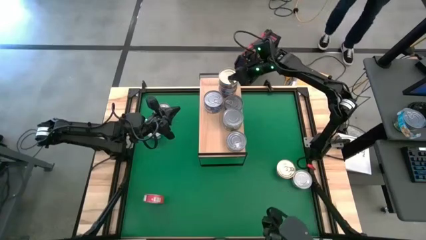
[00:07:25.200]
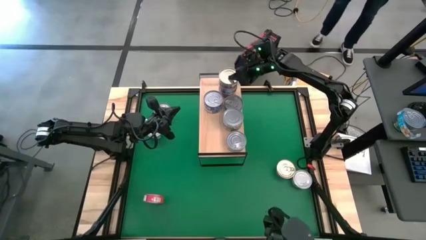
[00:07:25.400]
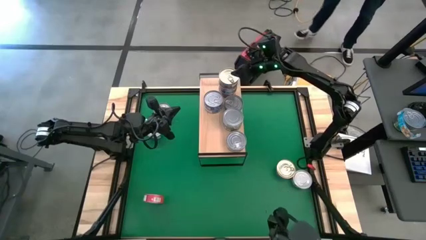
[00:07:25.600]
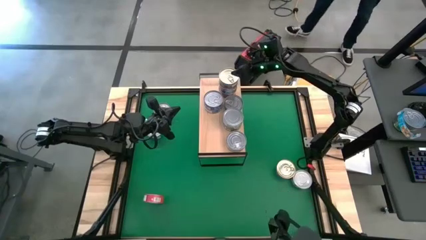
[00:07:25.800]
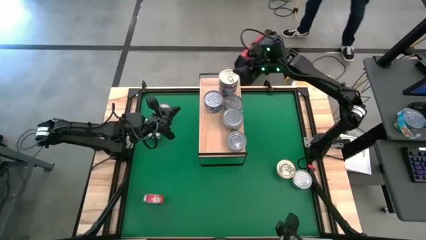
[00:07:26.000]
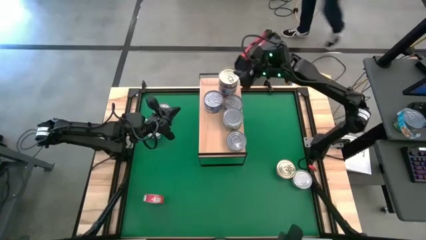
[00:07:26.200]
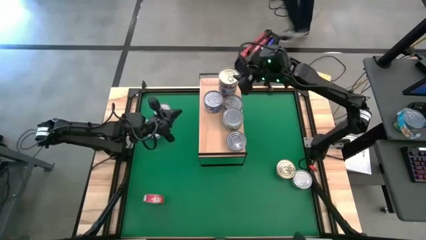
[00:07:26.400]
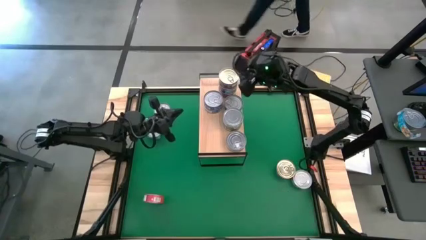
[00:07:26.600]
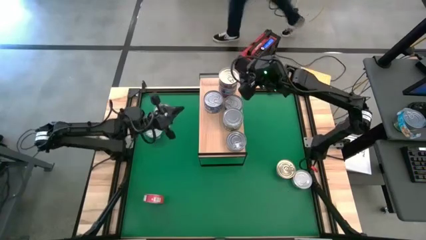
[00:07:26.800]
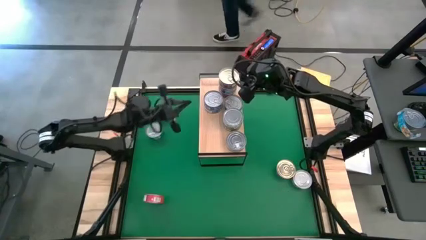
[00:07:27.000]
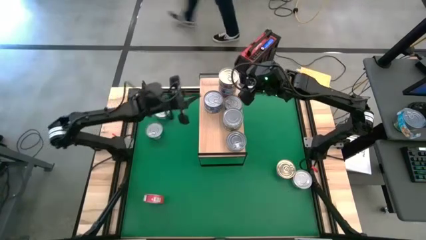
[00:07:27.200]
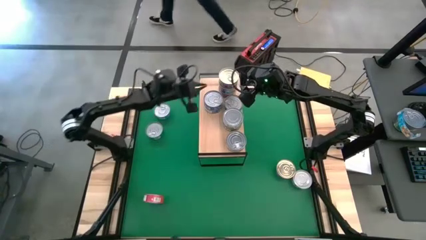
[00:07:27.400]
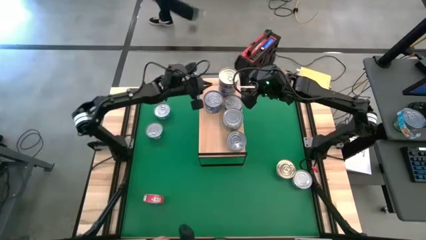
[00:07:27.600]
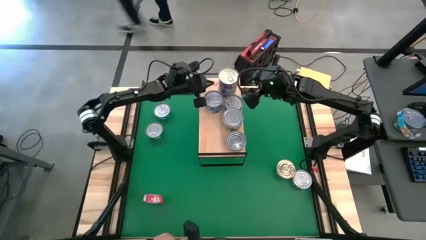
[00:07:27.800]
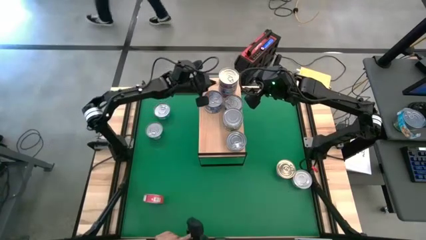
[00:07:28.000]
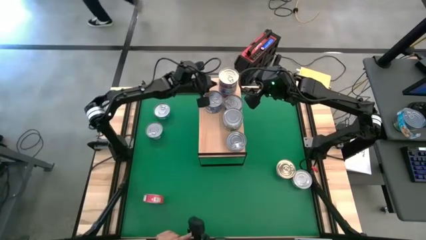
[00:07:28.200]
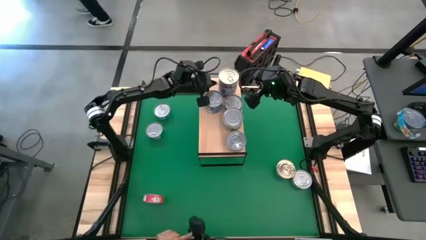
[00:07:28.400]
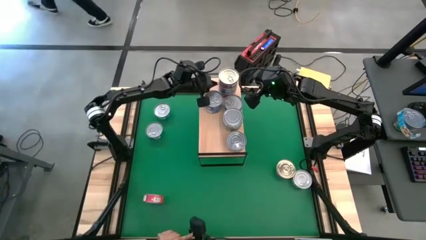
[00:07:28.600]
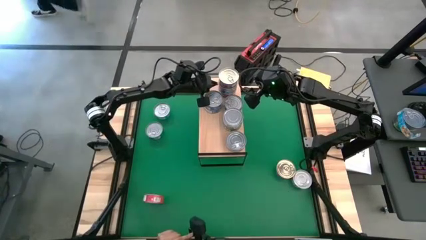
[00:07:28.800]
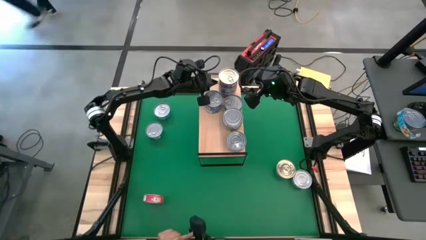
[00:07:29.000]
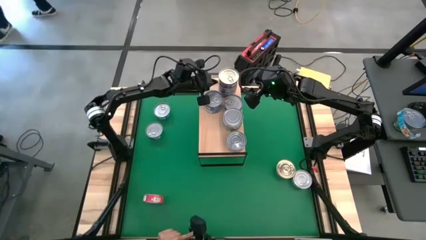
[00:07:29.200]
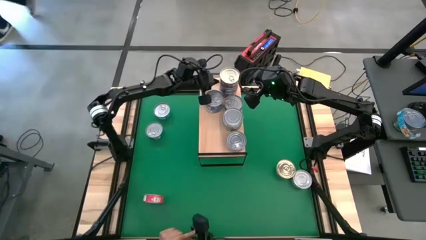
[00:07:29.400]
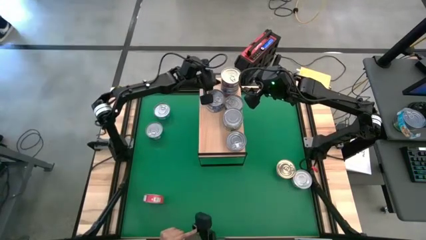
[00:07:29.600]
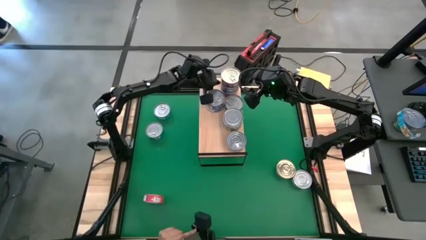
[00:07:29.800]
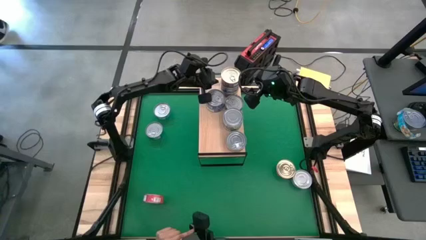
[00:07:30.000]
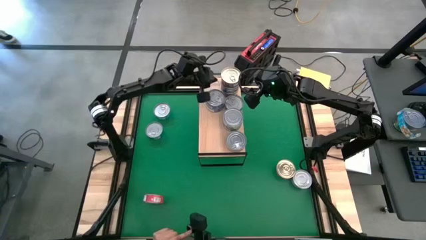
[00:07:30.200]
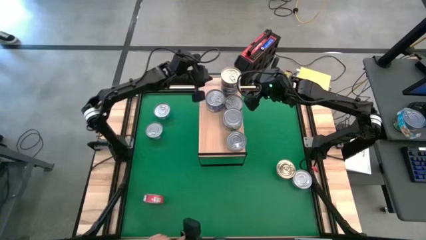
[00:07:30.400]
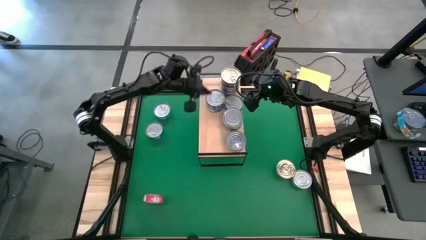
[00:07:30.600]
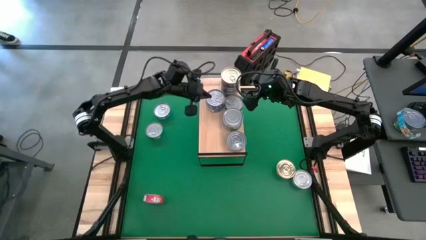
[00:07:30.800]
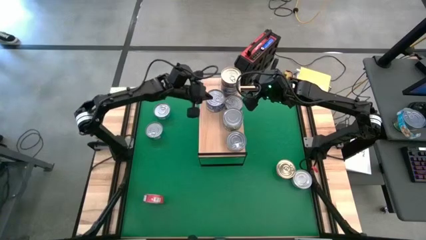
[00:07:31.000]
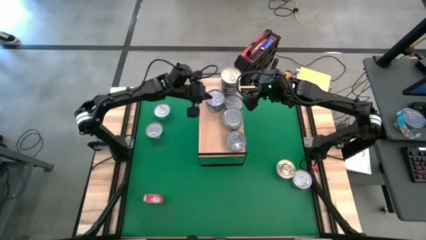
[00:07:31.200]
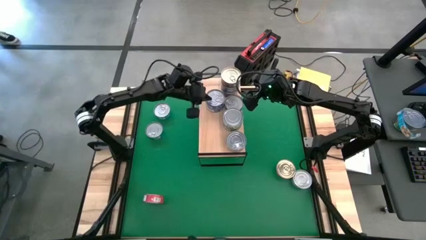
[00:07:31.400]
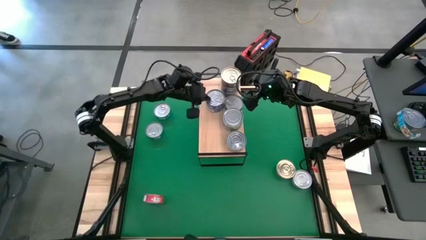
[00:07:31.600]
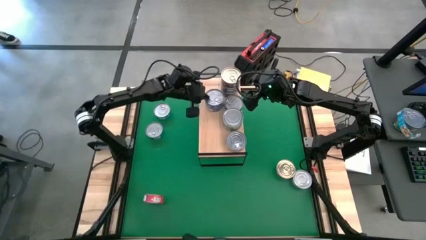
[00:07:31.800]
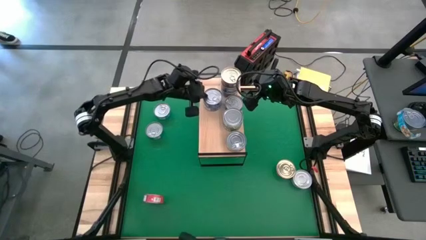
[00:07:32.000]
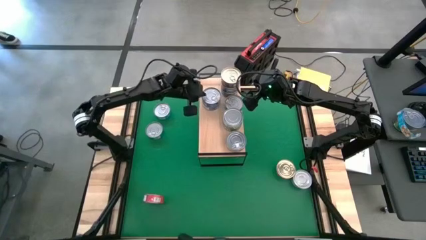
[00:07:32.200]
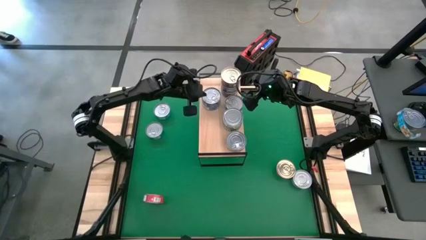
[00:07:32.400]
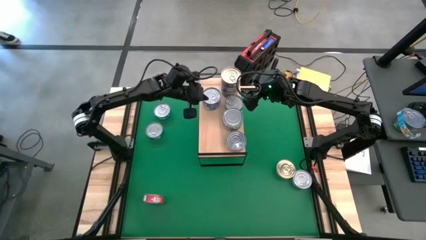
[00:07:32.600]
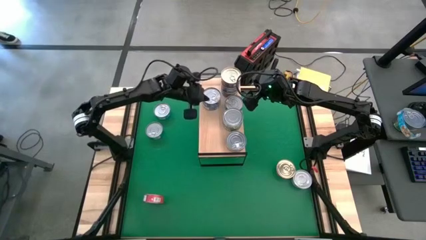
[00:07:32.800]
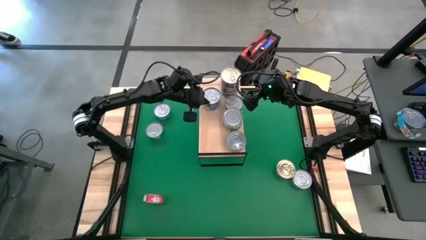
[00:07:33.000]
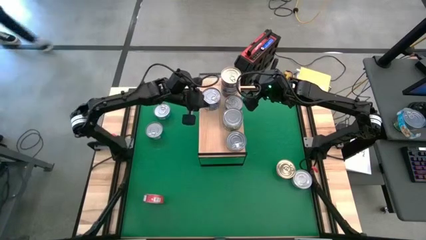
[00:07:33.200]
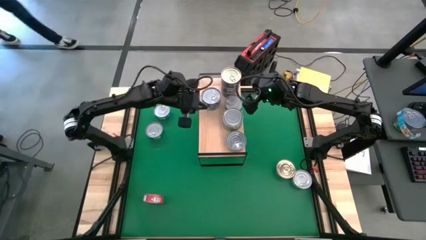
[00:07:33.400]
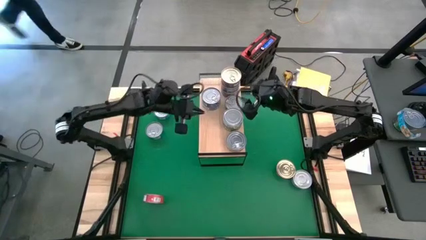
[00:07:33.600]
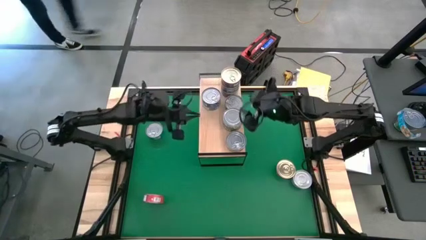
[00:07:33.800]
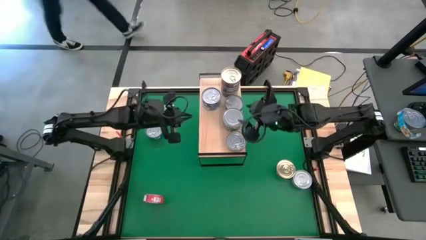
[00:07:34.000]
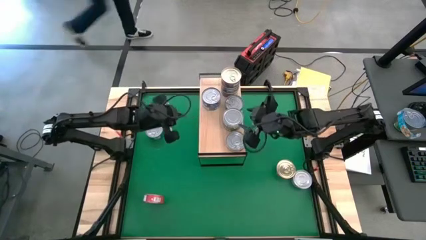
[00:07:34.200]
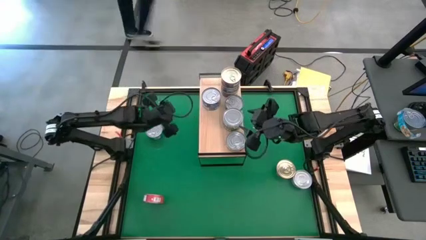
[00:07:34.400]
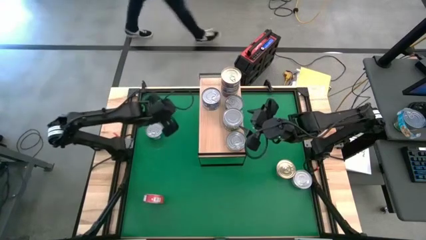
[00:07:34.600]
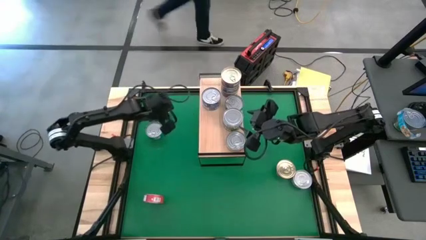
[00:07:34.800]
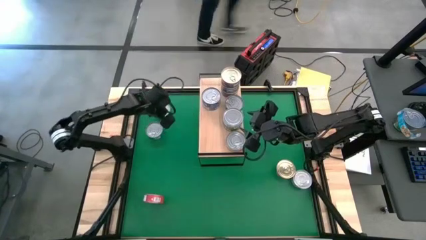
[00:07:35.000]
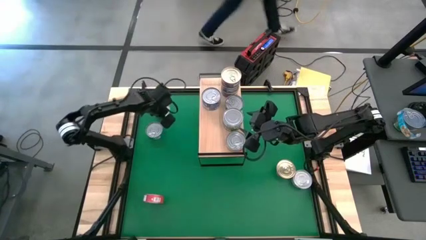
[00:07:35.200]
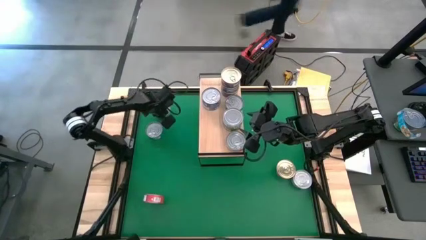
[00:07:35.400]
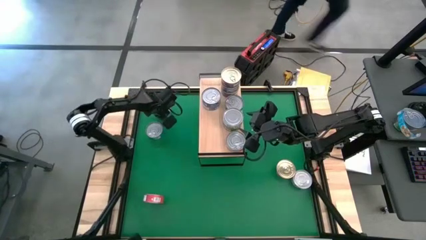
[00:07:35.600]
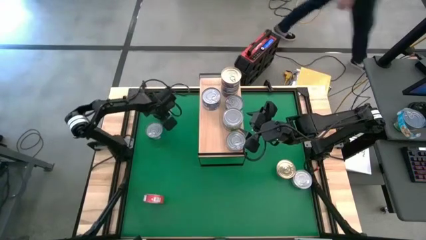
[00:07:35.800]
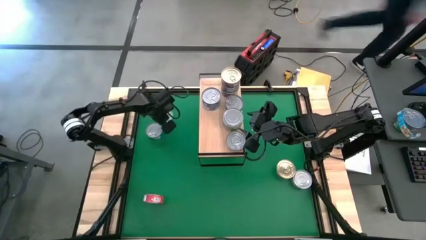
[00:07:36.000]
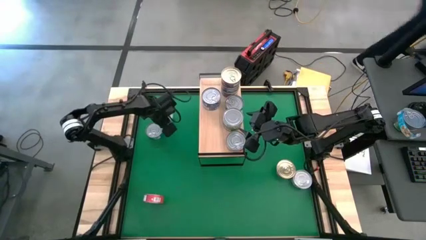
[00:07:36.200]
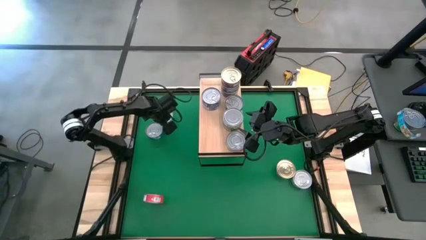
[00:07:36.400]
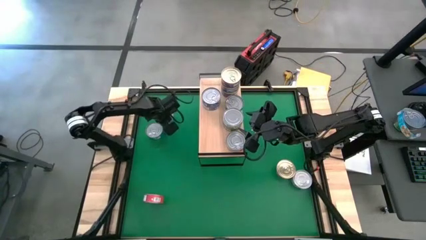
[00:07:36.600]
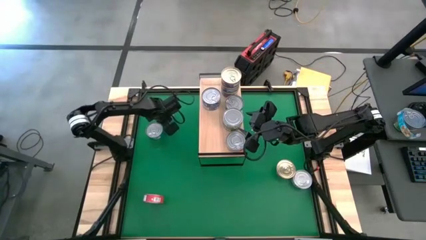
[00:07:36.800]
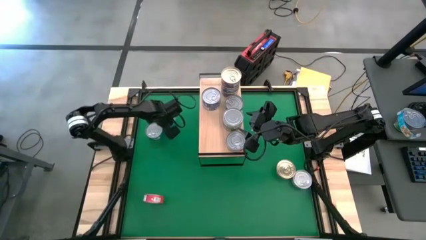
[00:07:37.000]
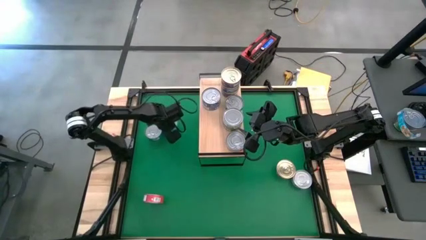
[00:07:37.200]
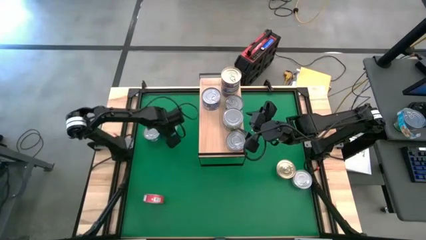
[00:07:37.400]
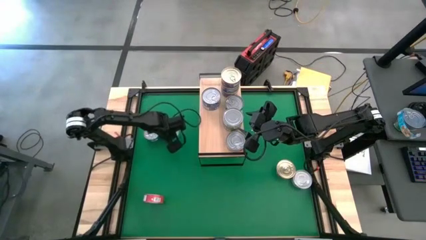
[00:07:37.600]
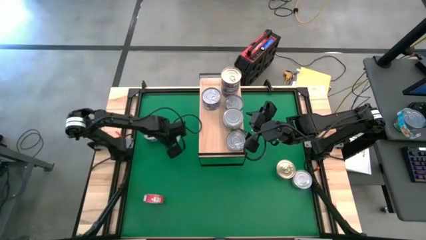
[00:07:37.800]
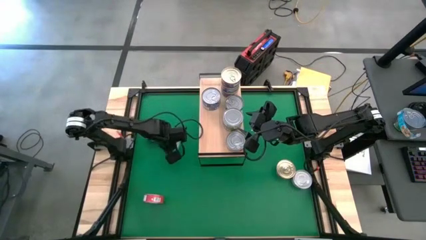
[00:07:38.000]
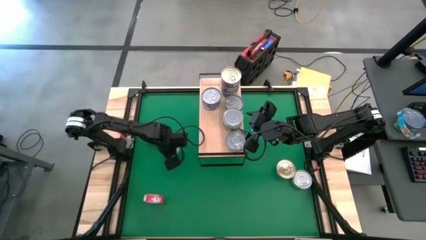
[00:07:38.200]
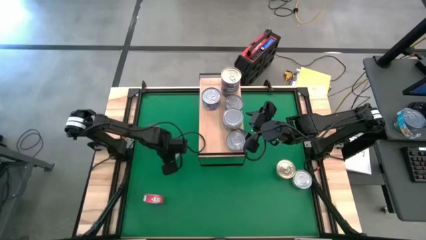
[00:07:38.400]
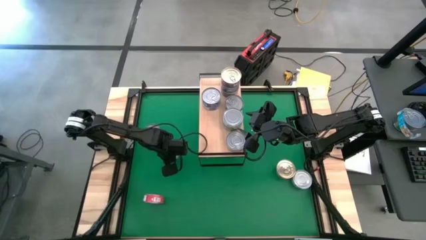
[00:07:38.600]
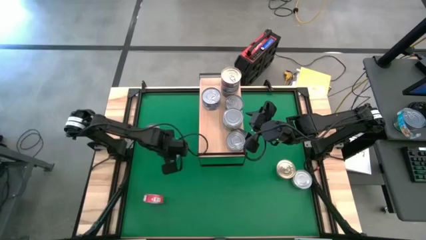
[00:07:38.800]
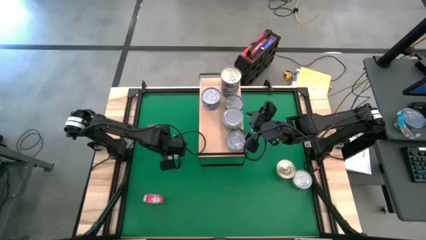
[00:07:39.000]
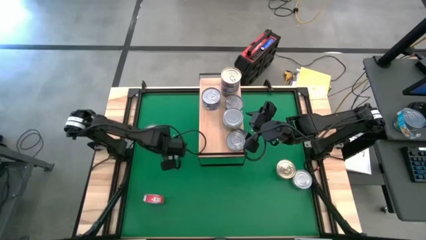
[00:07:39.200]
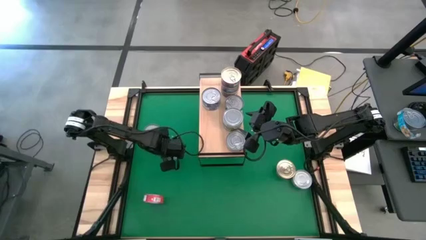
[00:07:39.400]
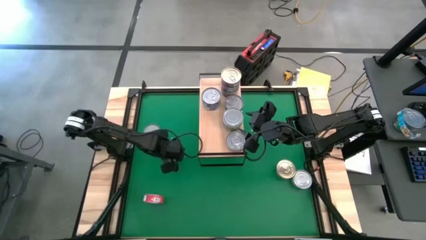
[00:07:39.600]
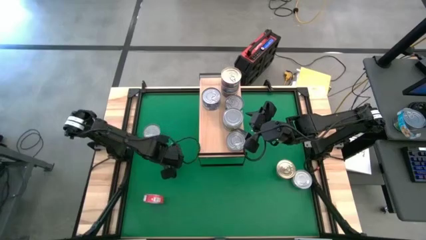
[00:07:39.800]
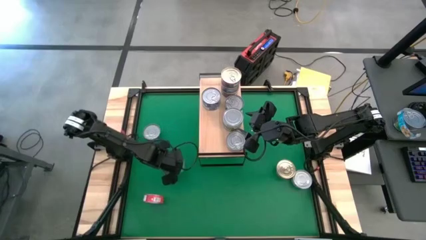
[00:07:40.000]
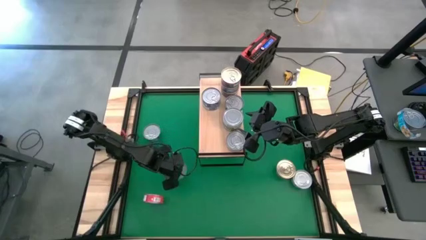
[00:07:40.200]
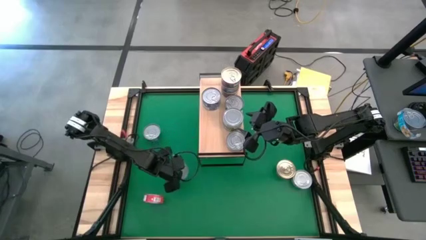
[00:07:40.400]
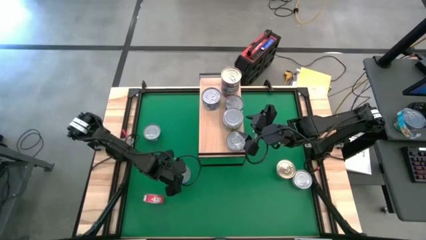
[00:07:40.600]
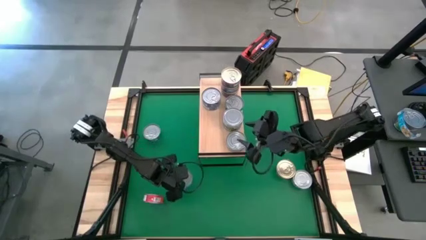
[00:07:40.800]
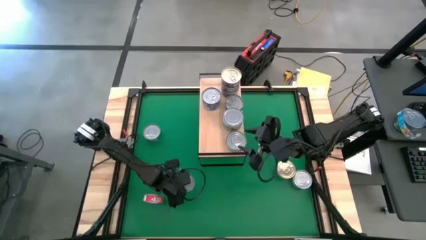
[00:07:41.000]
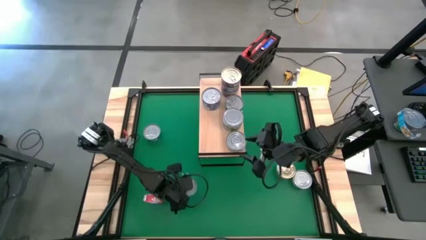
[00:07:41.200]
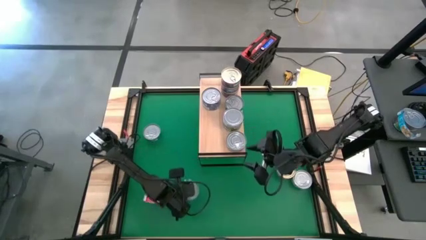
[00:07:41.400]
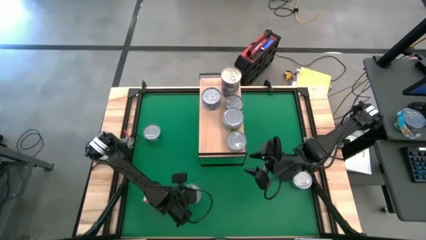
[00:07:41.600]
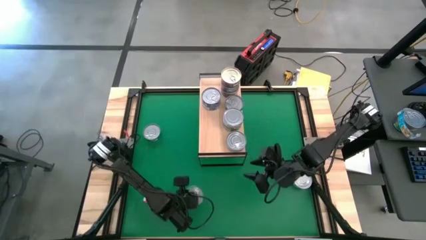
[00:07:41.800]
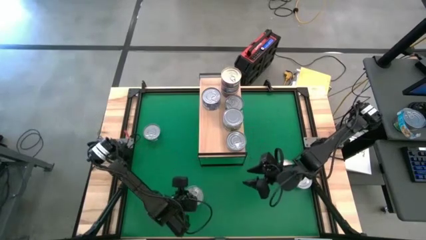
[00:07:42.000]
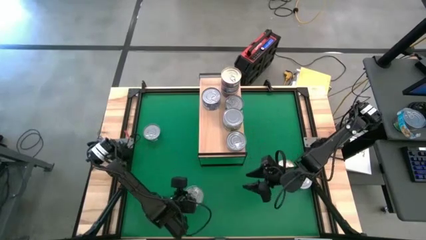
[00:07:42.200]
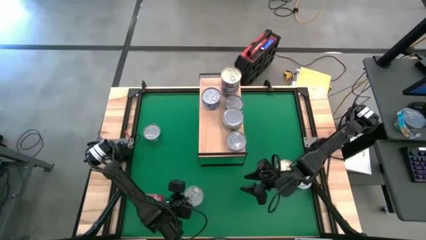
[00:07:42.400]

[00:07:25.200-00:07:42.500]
Task: Stack canned seafood by type on shelf
Put the top yellow tuna can on the shelf
